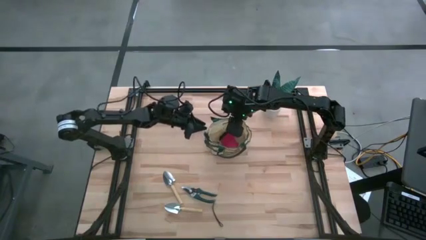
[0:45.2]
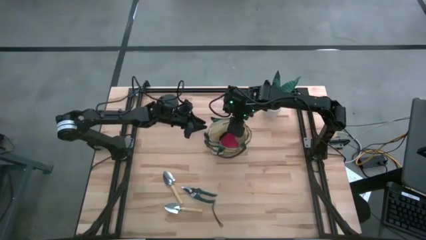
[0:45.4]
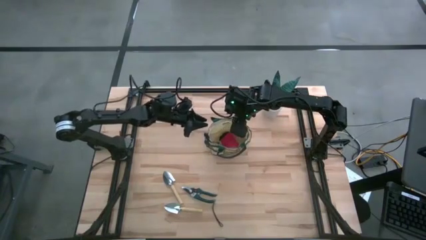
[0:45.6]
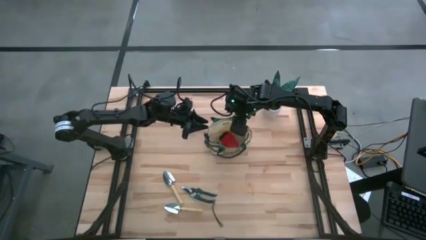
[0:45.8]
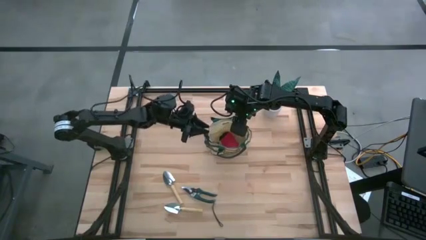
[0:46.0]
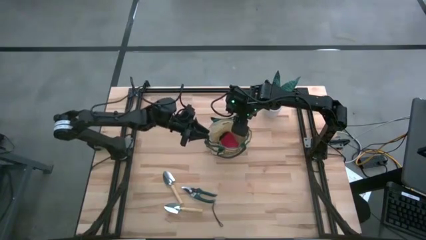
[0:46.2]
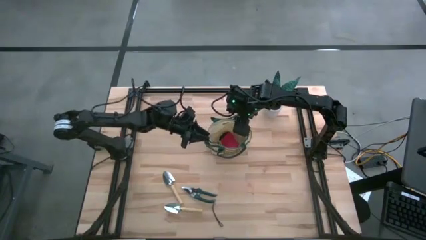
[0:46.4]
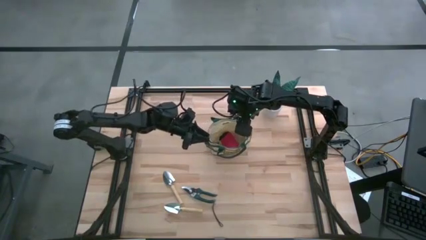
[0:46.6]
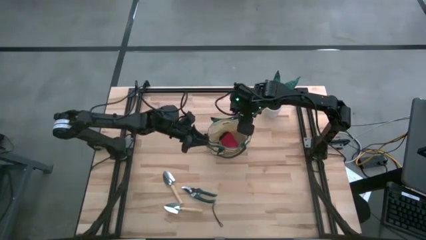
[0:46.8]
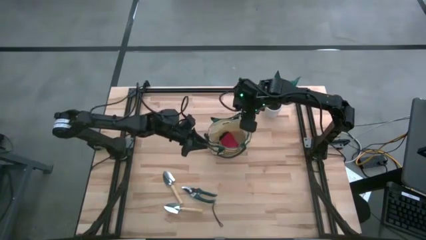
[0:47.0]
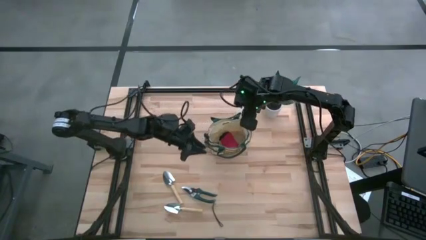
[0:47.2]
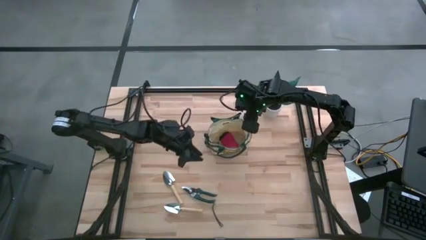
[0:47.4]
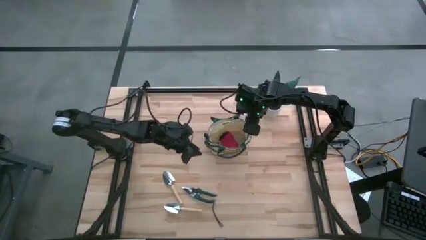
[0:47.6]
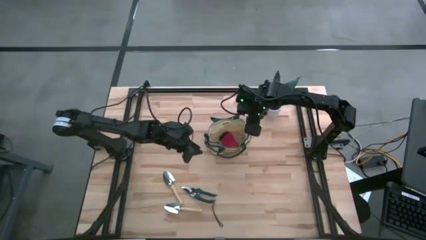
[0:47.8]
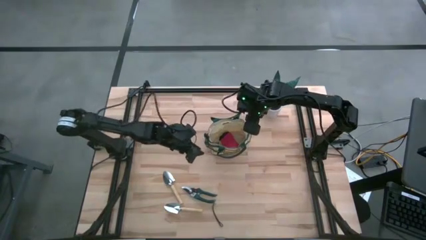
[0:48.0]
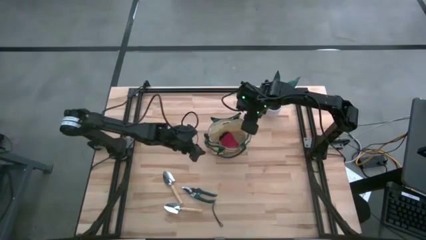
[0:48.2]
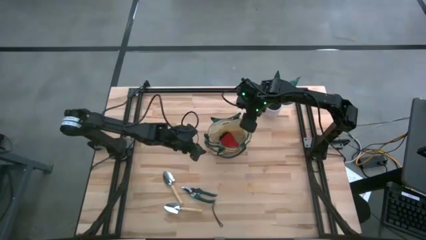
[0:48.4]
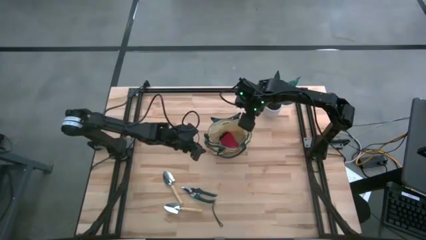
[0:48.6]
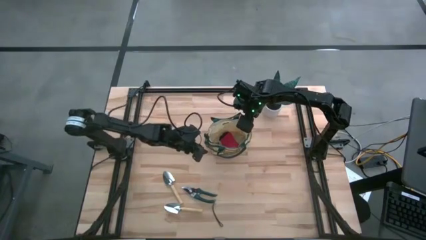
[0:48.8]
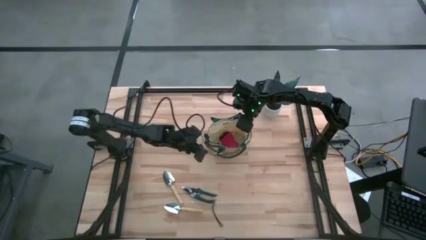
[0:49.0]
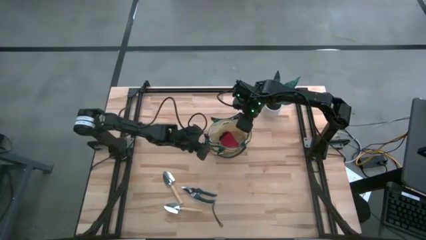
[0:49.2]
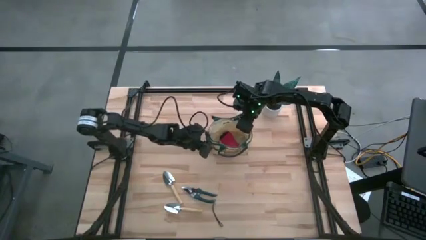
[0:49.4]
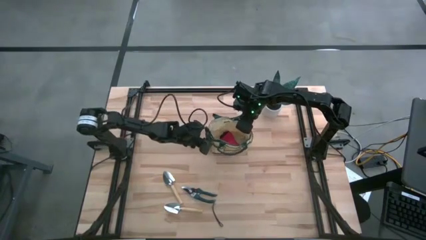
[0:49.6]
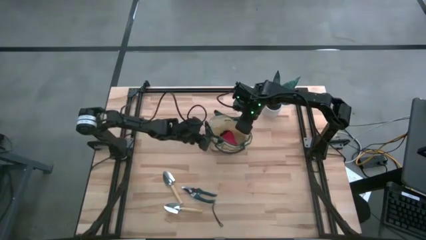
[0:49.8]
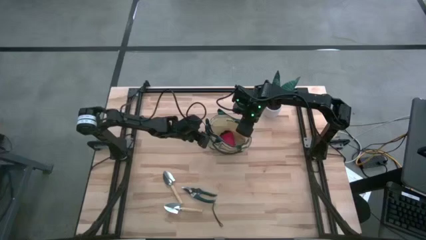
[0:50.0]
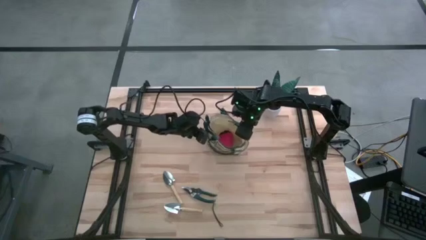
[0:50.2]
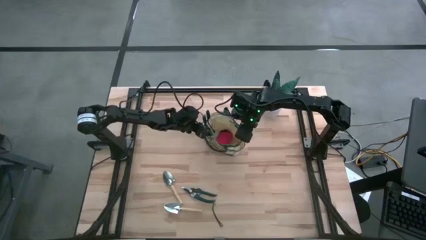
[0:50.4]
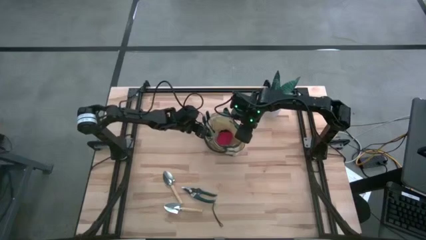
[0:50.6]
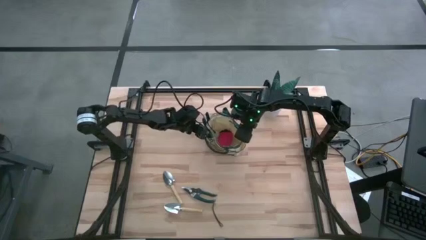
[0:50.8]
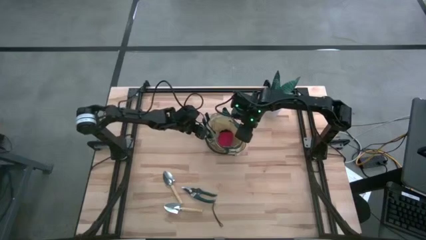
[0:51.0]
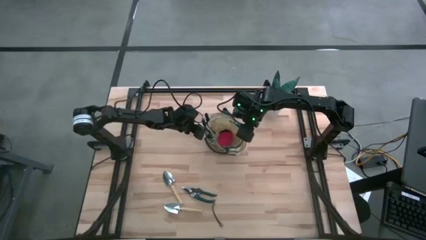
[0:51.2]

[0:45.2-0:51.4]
Task: Pick & Place Garden tools in Gardening bag
Adjust the bag

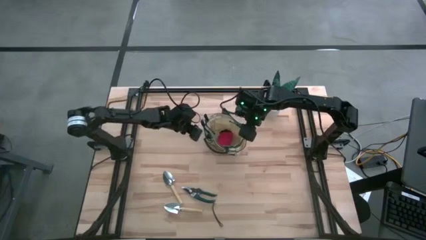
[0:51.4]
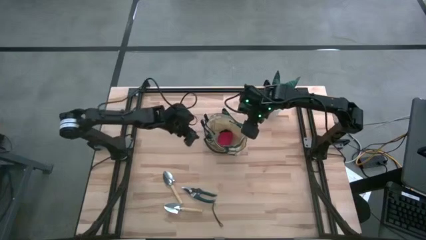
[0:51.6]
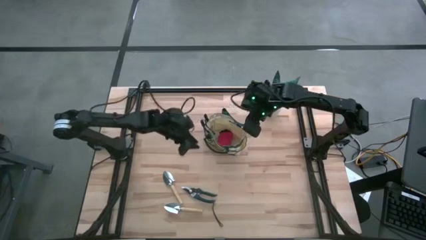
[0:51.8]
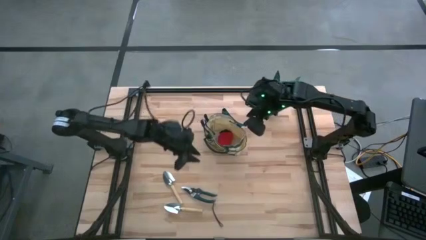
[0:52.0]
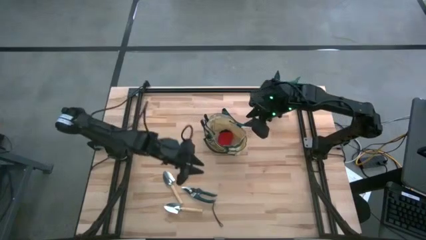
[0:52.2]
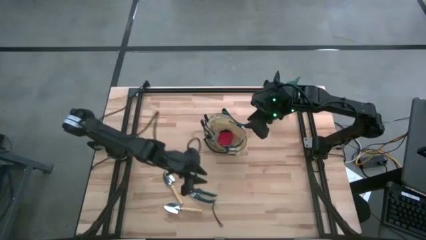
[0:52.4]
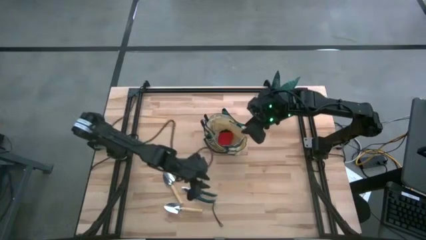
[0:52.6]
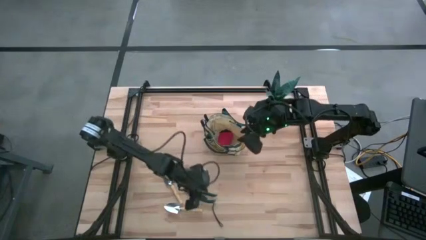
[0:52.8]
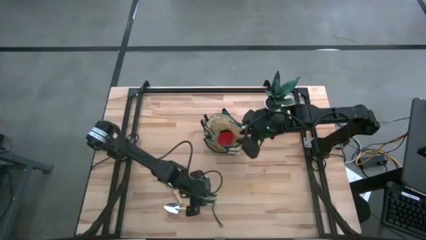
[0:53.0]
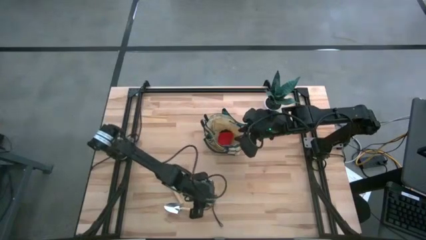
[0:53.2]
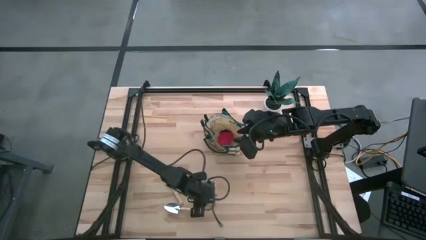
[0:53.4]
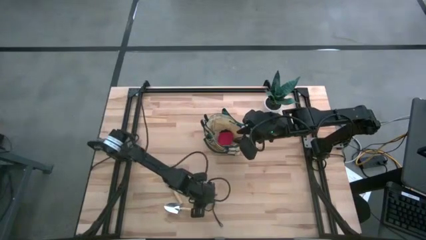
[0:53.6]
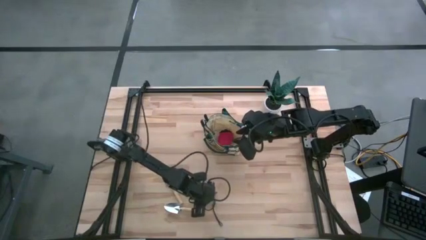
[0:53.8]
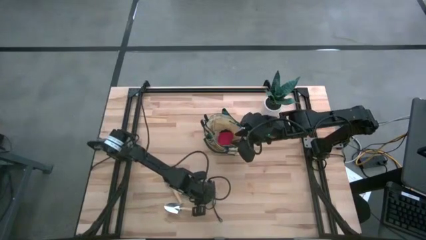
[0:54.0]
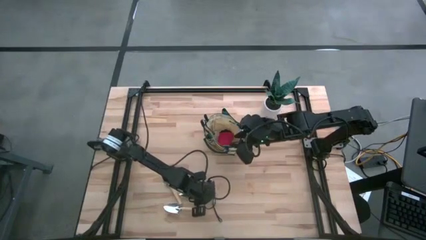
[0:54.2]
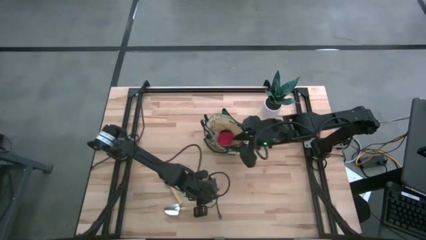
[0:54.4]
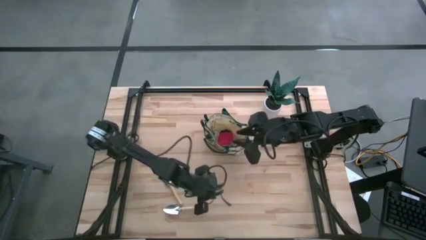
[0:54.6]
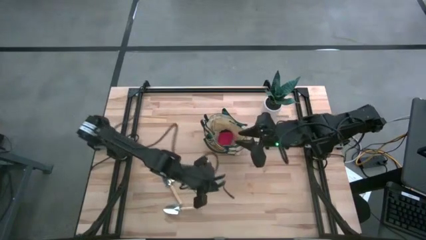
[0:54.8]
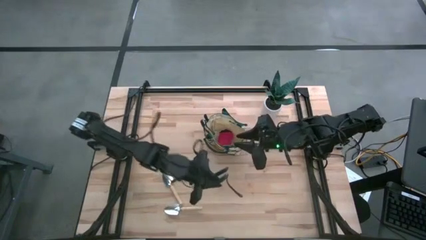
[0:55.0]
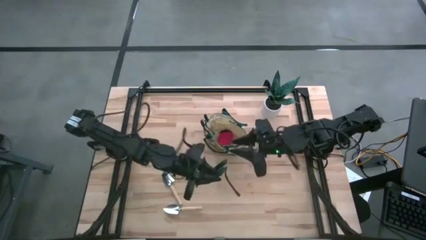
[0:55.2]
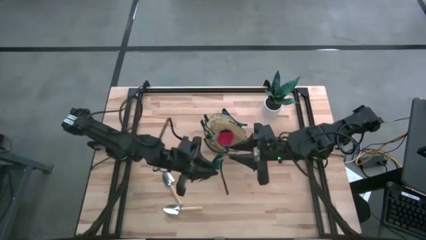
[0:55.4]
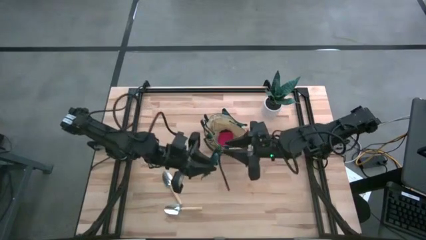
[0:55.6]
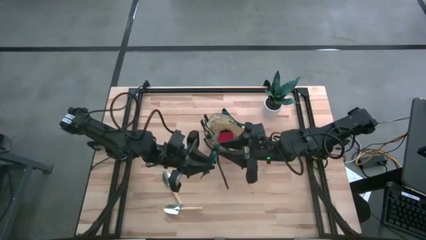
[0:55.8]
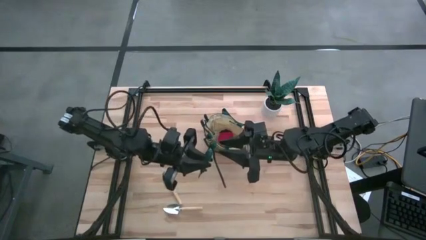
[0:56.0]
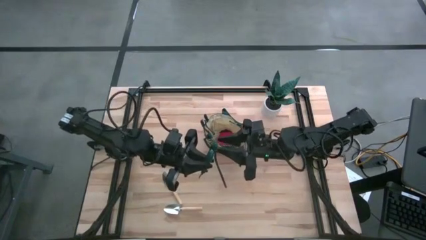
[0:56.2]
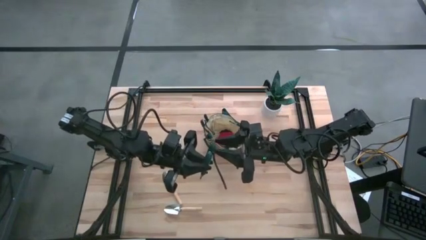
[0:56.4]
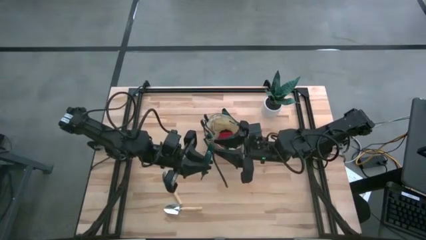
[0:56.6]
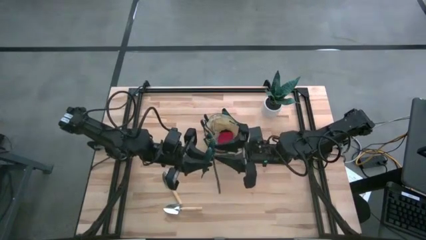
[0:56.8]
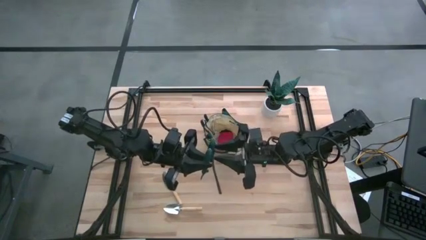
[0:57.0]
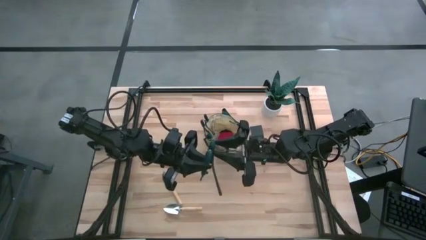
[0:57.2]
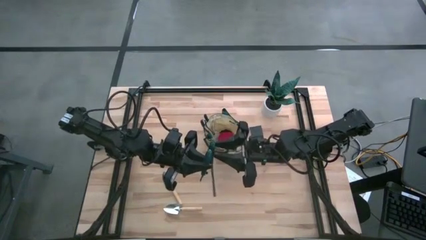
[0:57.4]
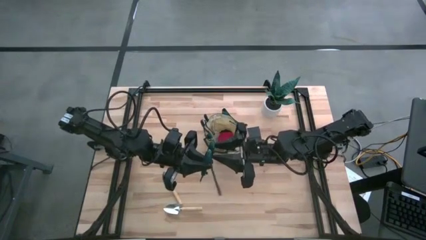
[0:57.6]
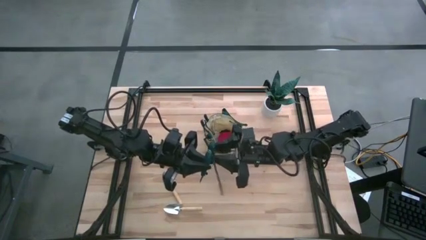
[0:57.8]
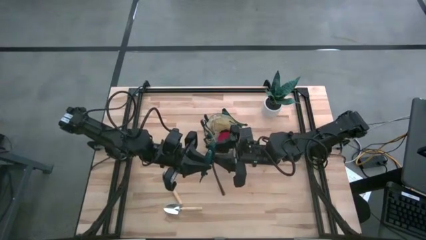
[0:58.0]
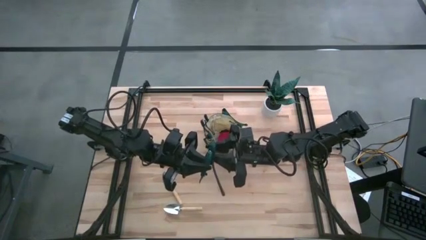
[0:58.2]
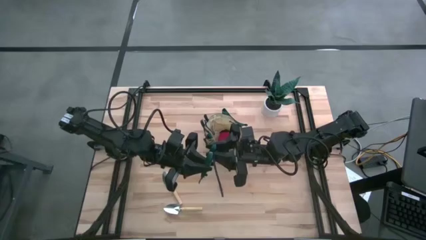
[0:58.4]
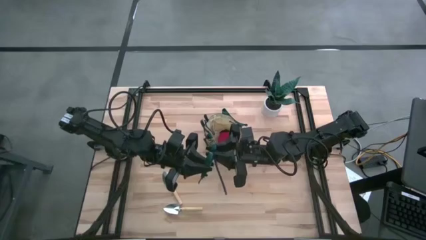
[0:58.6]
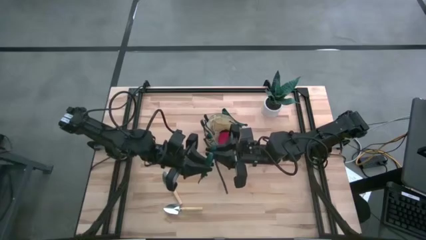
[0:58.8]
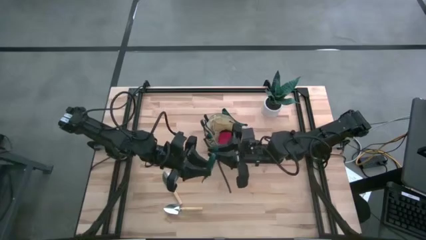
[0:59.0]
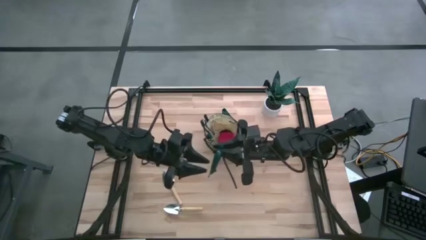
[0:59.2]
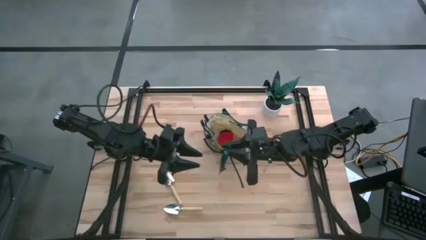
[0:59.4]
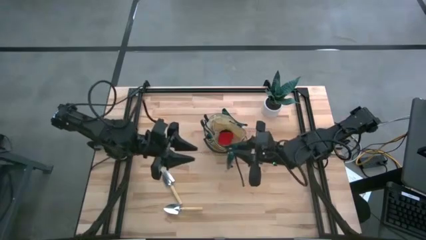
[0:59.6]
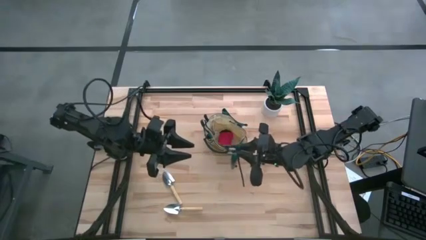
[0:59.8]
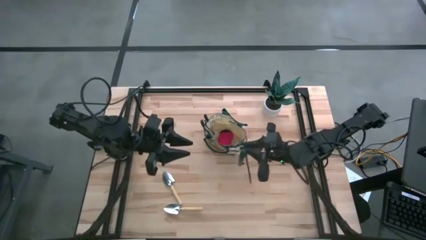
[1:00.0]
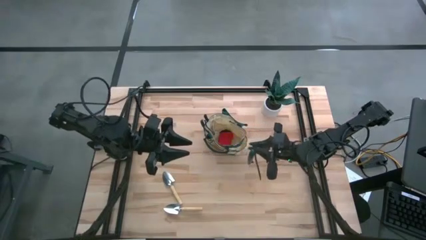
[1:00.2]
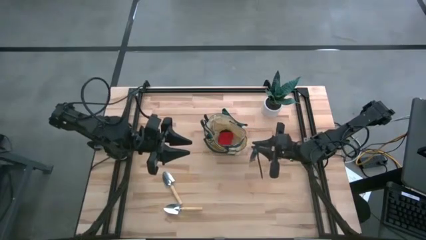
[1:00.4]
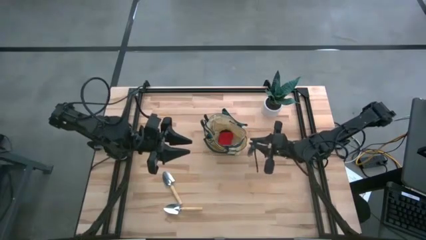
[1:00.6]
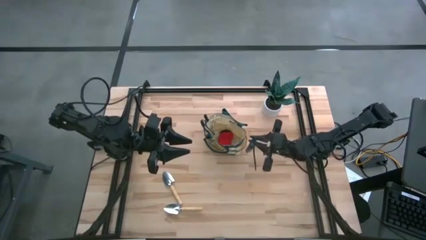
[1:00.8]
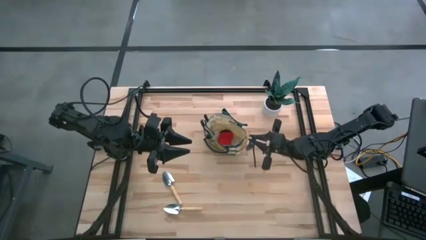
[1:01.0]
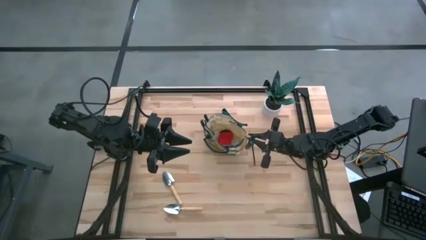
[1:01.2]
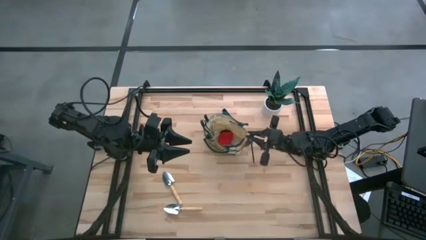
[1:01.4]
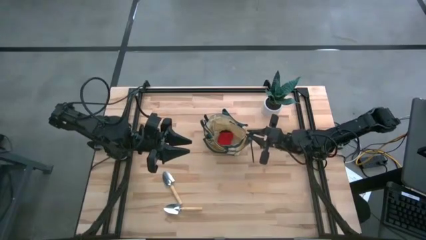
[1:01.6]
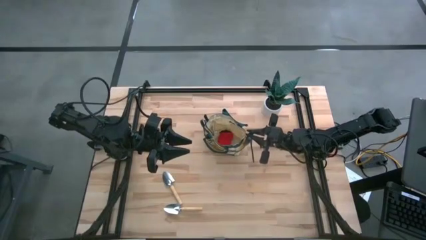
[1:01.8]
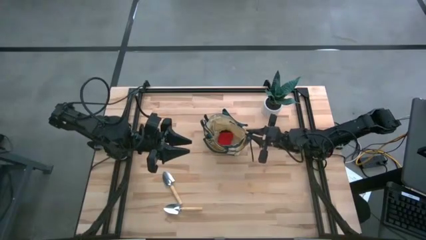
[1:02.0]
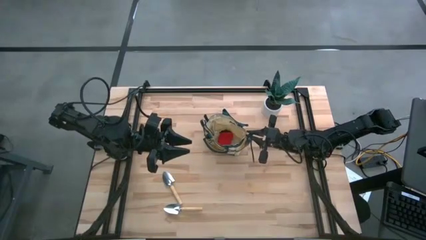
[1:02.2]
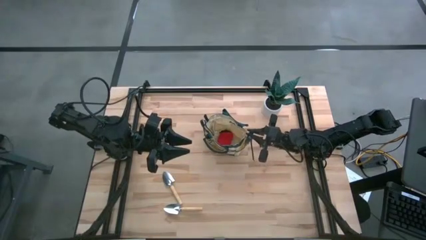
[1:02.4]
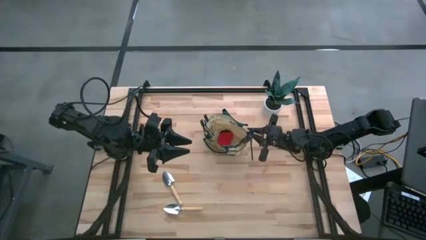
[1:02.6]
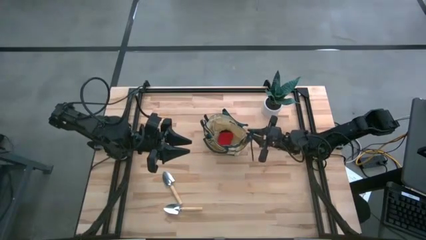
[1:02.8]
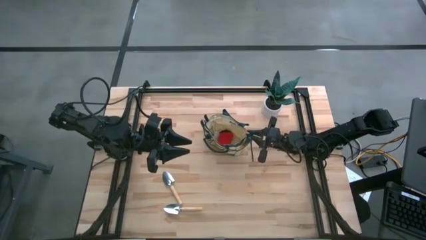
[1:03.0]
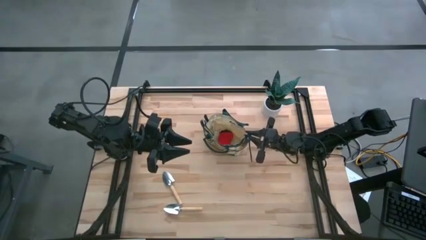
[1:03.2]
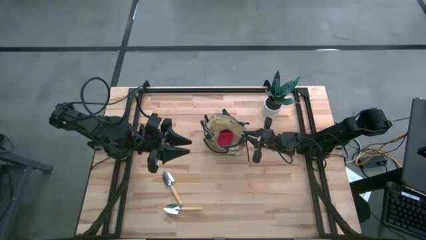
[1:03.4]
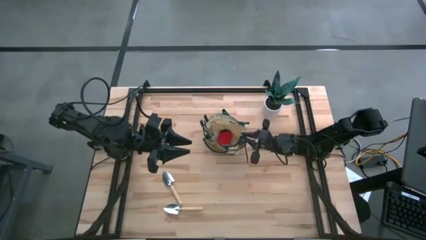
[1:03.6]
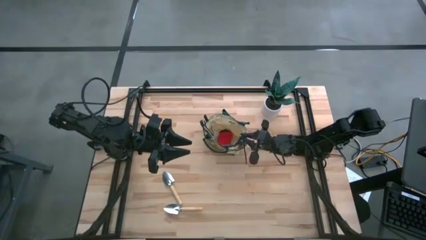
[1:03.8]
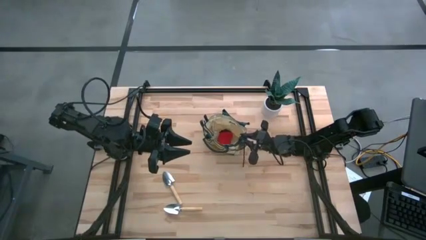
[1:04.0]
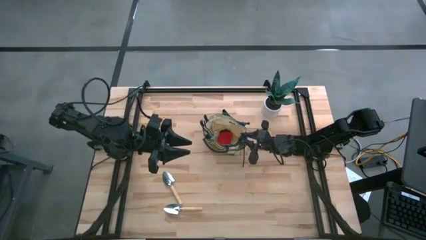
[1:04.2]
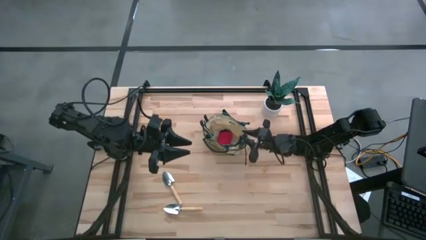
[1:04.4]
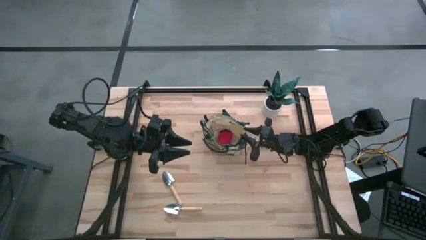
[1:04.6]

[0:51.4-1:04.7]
Put the pruner into the right bag pocket
